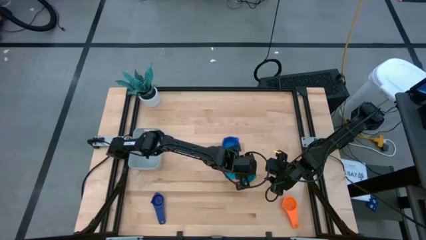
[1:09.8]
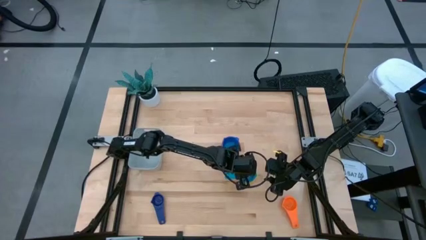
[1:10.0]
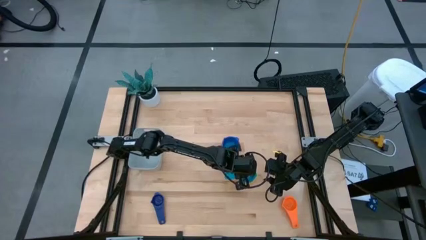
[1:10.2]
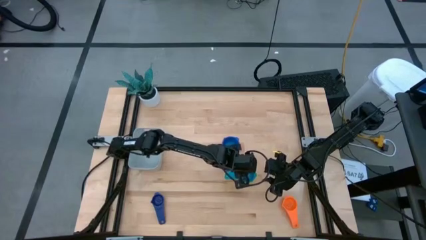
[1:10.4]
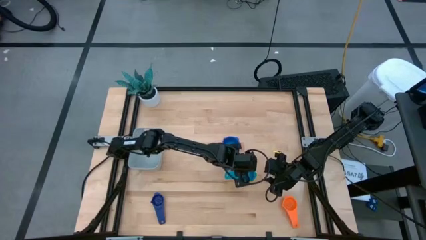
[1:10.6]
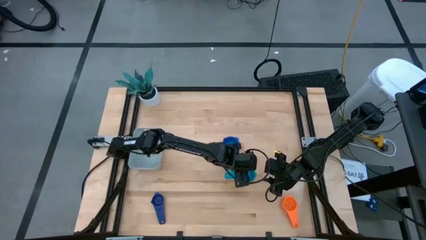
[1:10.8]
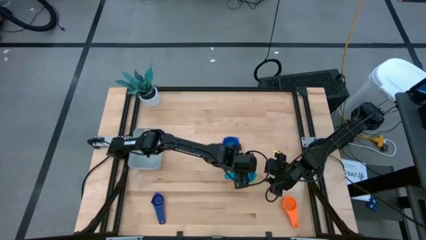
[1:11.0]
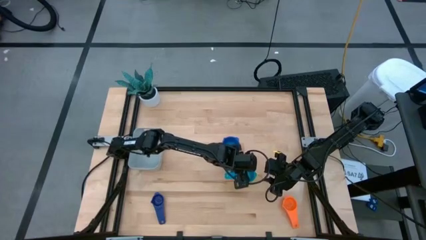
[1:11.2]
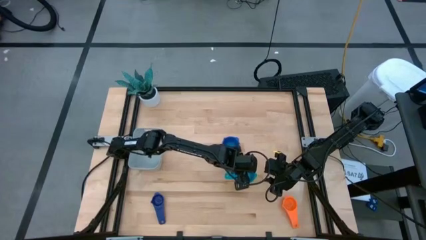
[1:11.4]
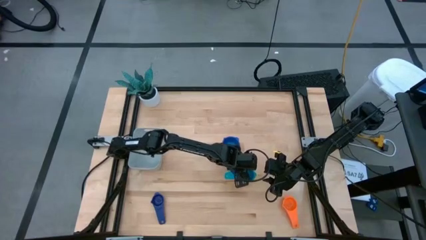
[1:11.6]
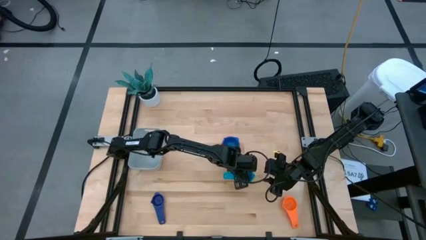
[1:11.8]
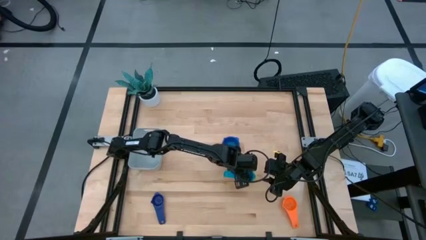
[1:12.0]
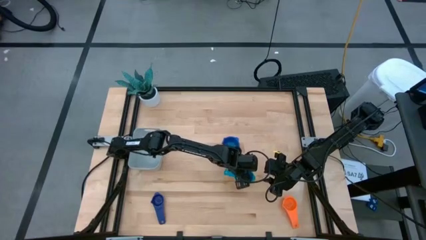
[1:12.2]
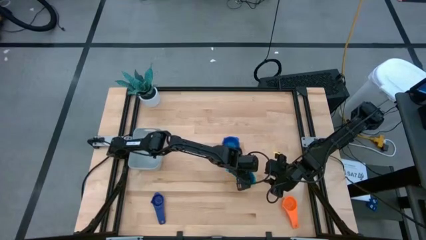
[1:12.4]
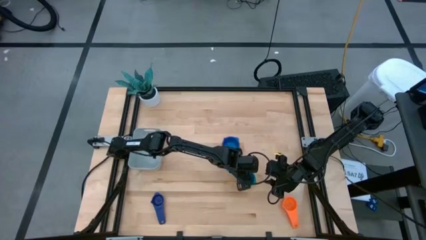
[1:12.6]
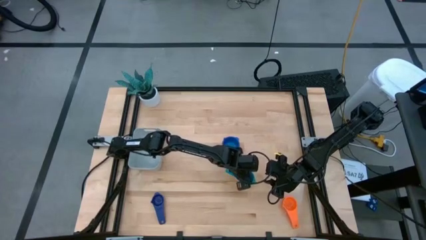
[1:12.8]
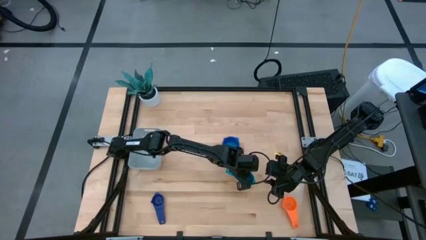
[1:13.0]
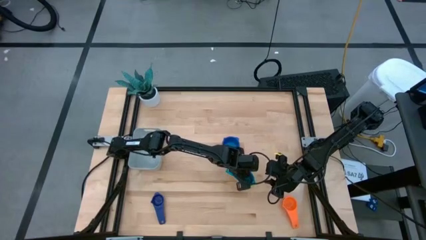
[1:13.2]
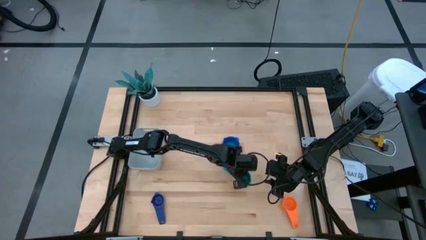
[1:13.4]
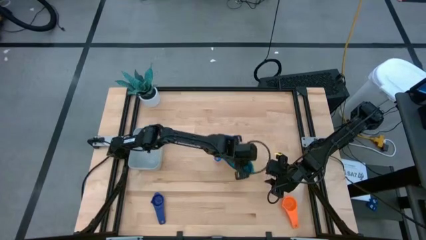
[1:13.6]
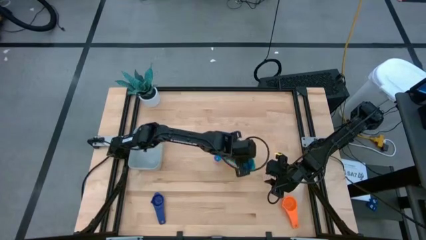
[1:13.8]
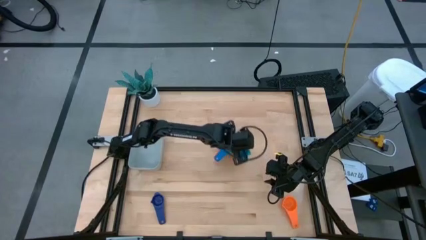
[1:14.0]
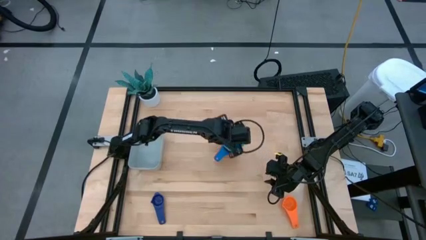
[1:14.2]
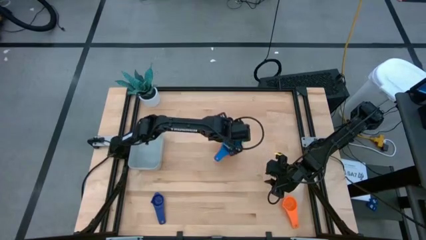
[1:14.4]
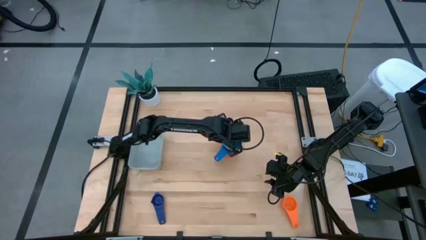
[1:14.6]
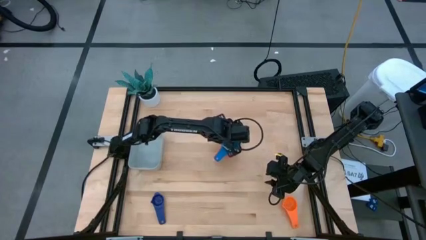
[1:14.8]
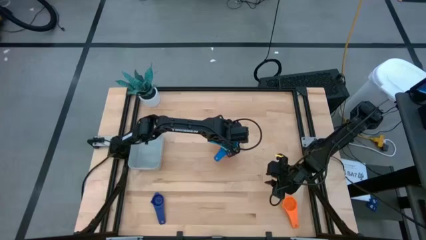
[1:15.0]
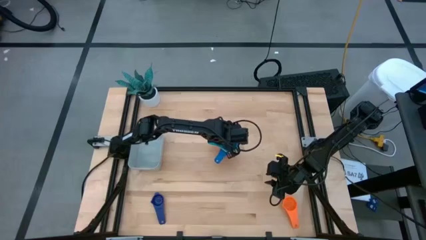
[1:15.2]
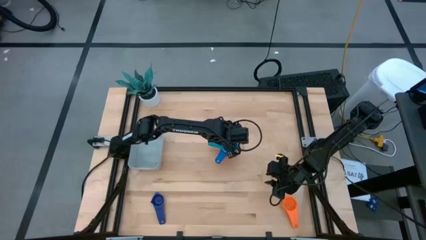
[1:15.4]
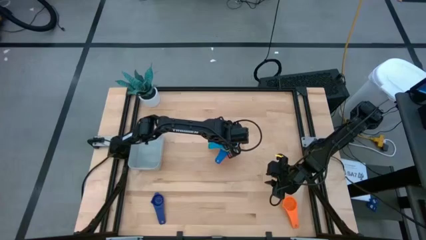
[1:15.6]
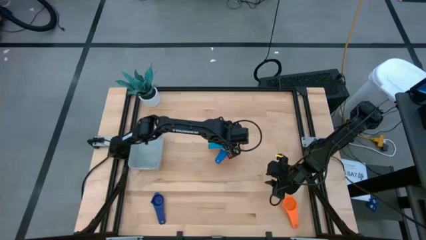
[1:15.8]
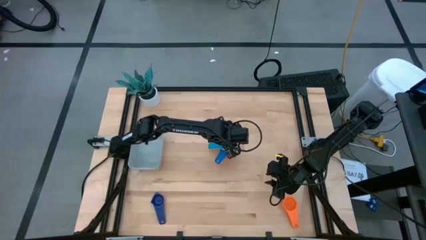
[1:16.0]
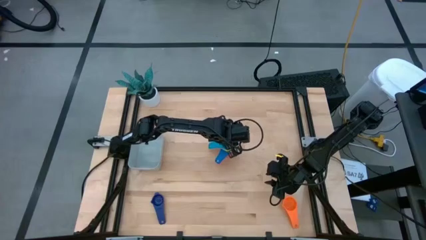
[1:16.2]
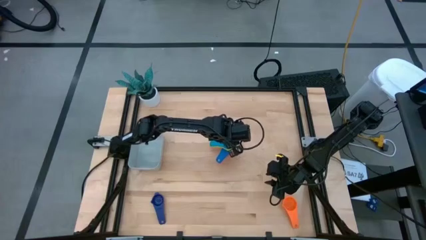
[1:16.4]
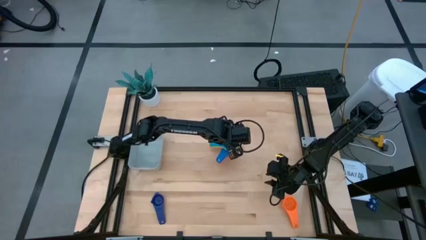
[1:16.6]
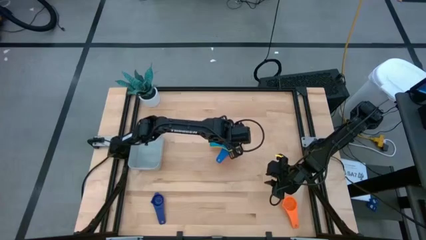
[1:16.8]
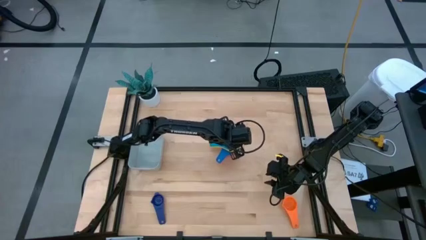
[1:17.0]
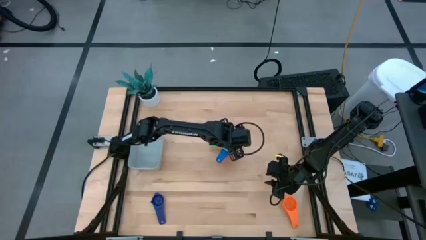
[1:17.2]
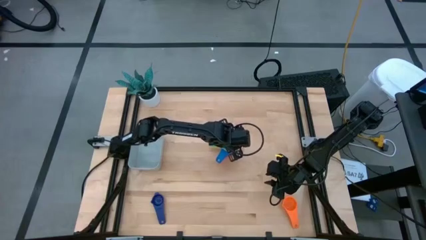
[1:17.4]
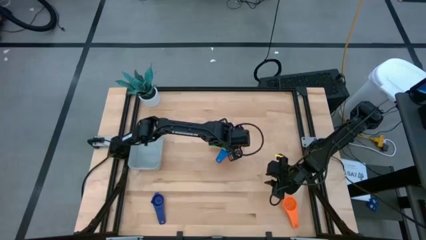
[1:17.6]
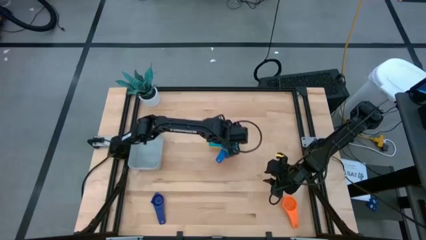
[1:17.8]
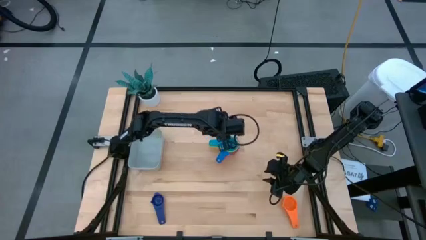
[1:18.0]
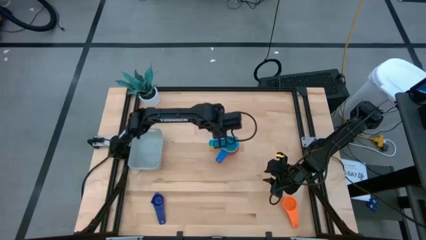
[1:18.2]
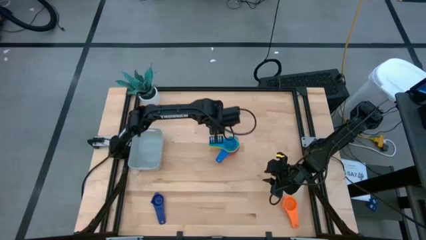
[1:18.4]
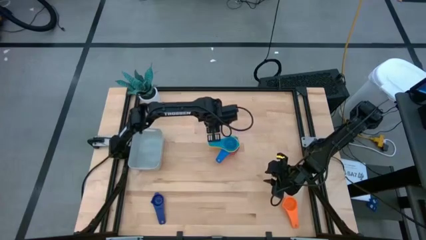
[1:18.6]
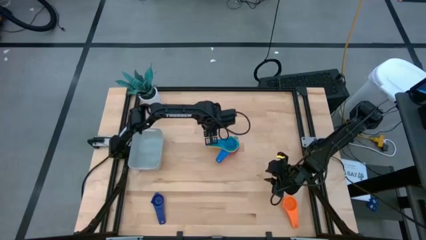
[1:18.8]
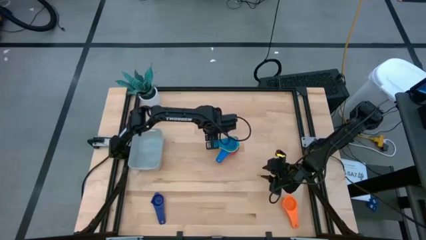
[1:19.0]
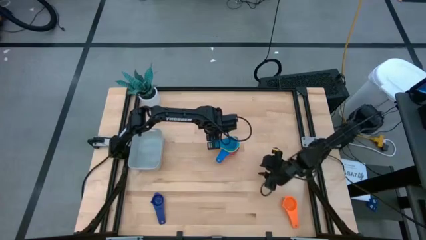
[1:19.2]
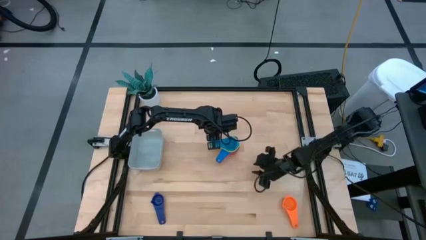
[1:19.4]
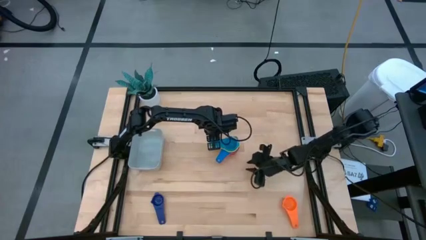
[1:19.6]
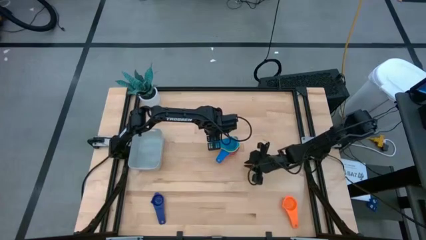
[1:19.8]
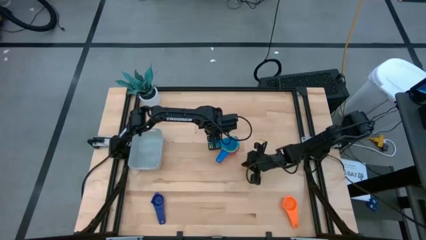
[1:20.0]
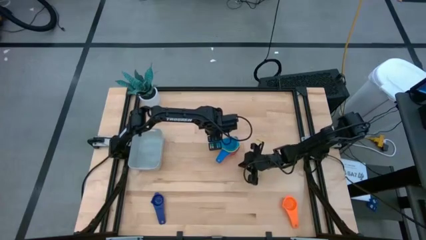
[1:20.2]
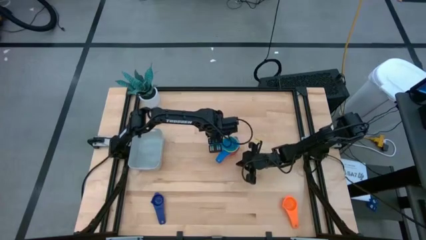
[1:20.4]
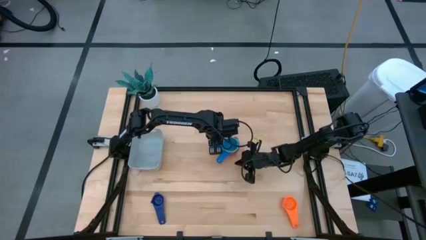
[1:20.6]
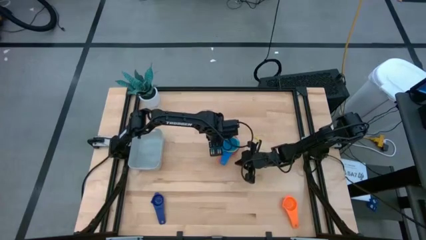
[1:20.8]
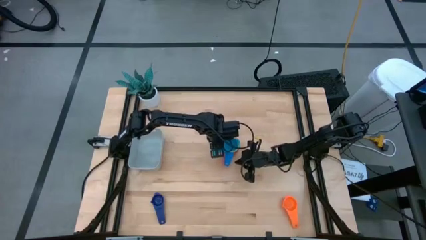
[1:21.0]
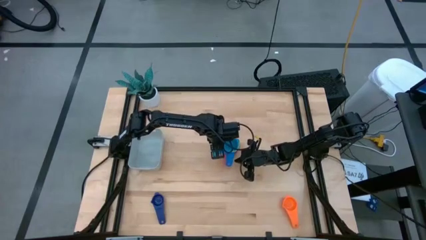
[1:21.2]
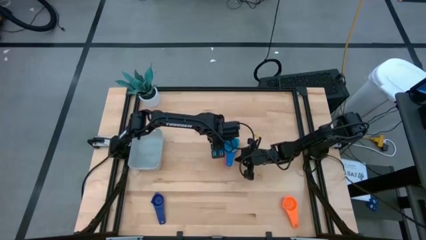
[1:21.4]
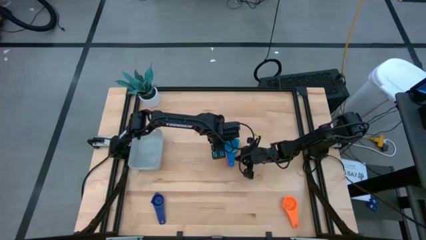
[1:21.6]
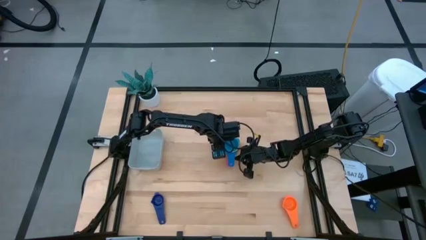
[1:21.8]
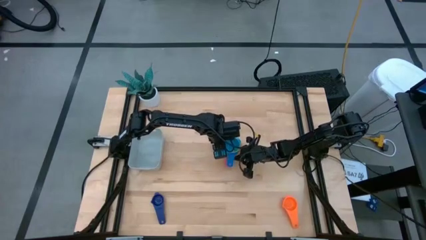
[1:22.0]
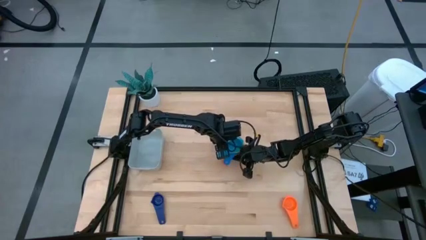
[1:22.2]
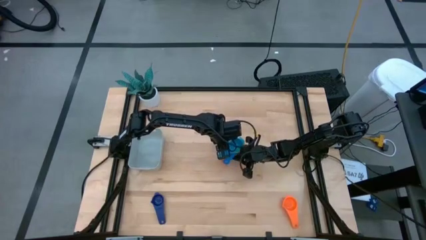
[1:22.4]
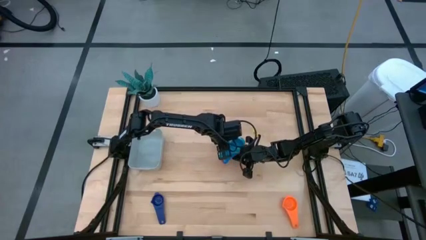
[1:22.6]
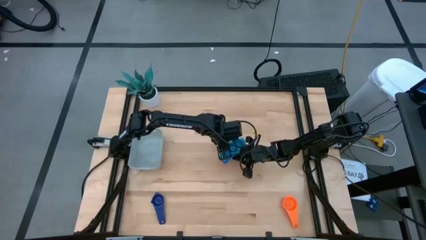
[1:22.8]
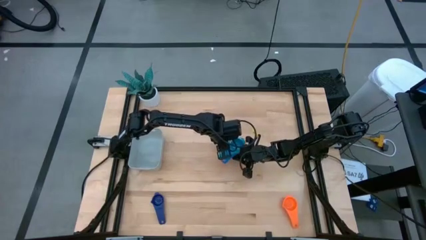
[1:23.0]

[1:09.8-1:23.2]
Task: Nest measuring cups in basket
Stack the bottom stacked measuring cups on top of the light blue measuring cup
